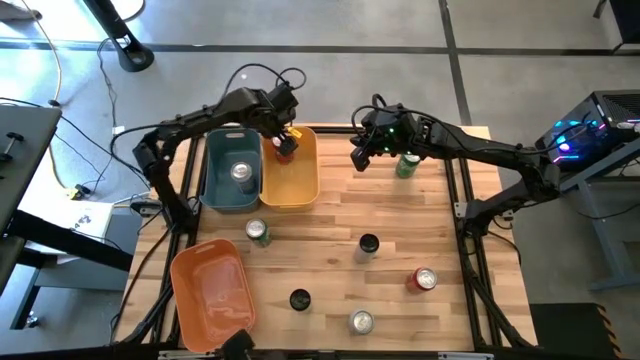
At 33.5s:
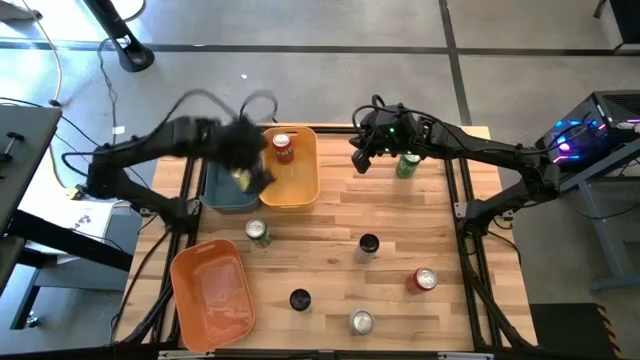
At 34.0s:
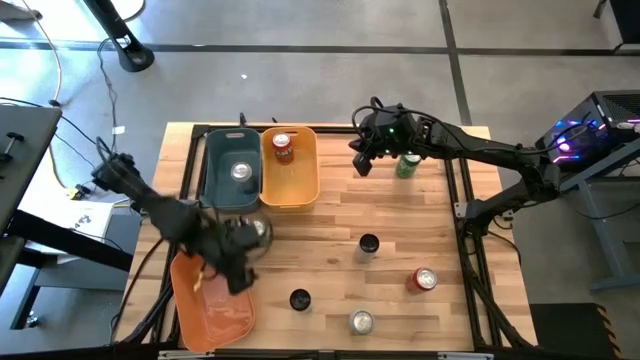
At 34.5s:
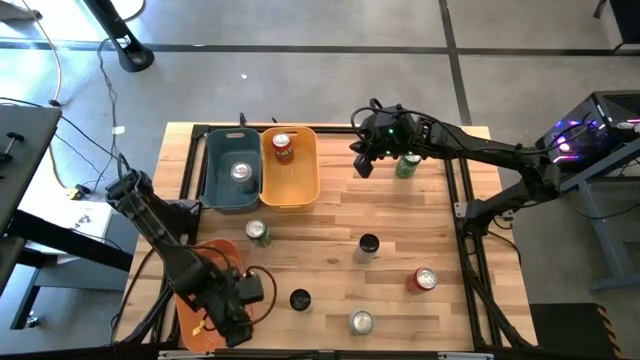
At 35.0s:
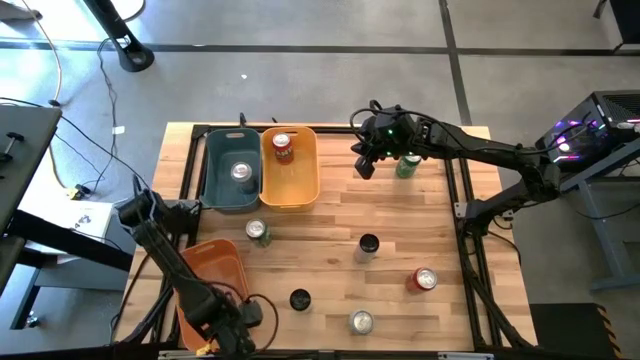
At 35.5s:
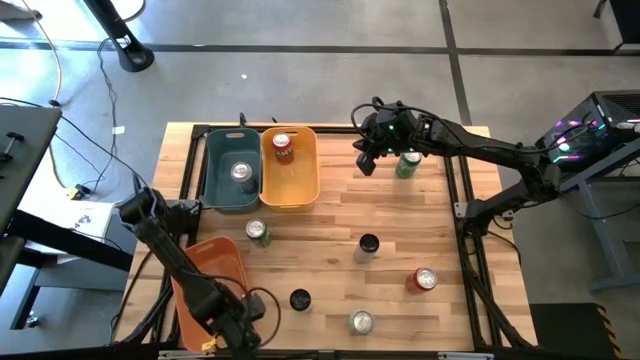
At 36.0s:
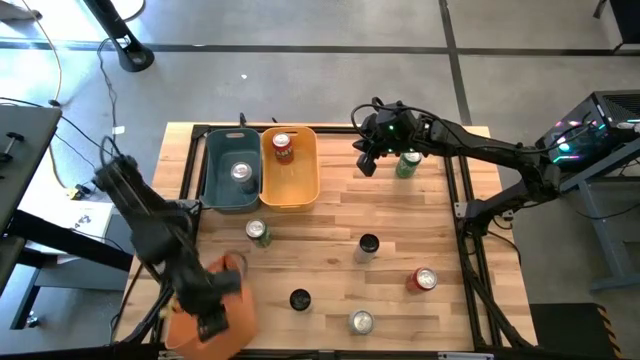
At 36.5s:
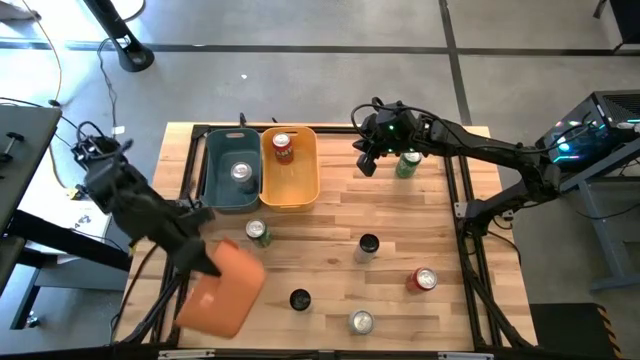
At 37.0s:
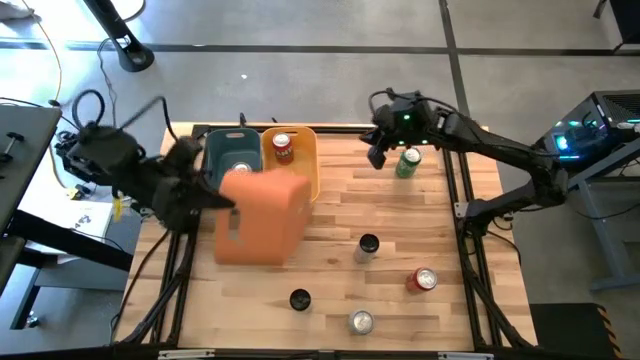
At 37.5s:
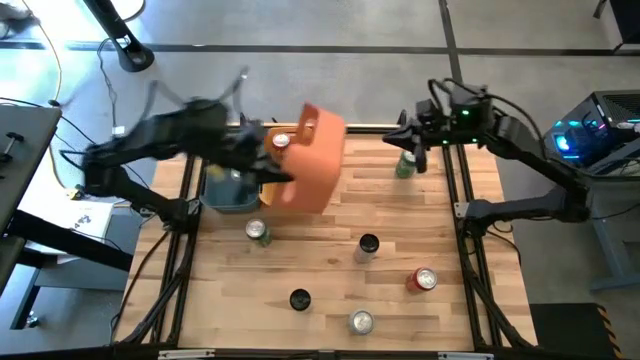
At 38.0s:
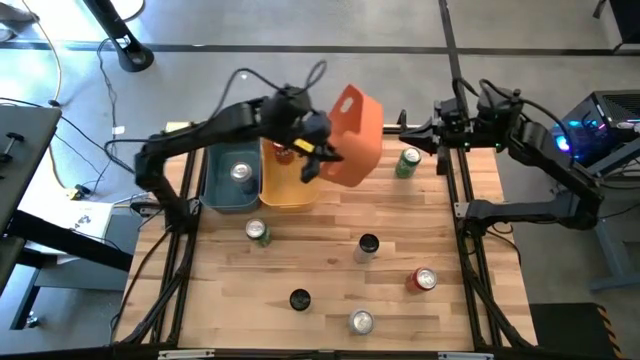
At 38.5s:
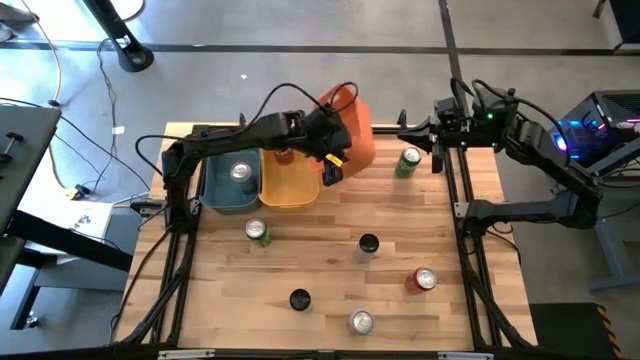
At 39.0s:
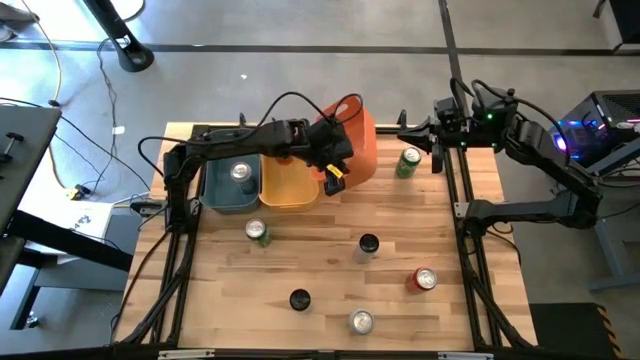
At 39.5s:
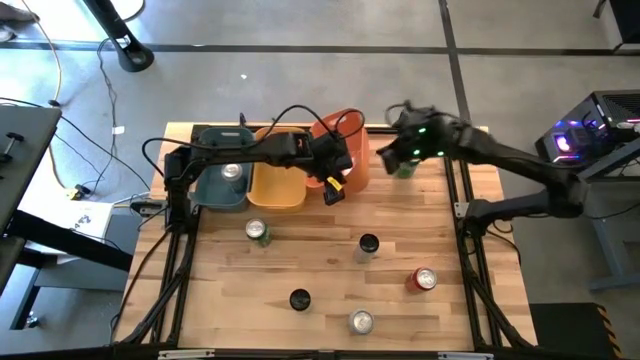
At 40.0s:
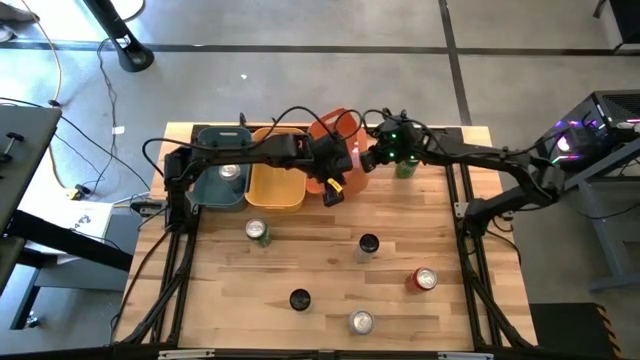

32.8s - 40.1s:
Task: Sort soda cans
Move the orange bin to the right of the yellow bin

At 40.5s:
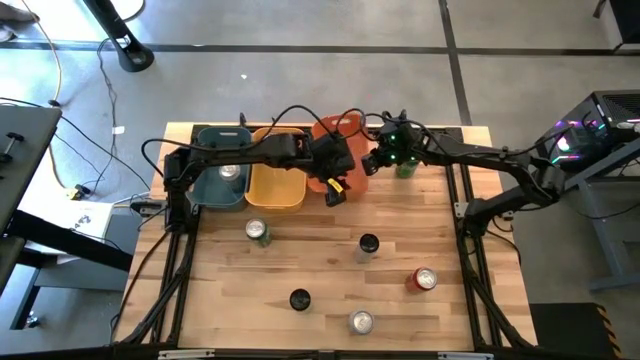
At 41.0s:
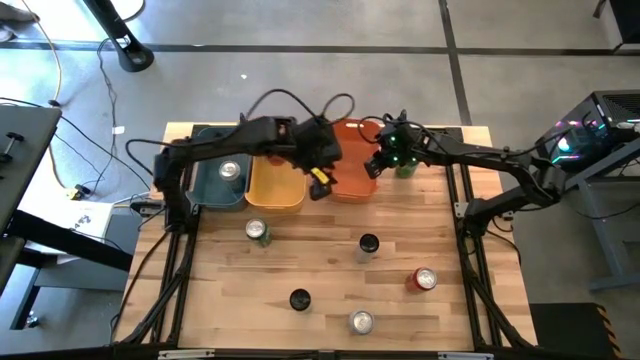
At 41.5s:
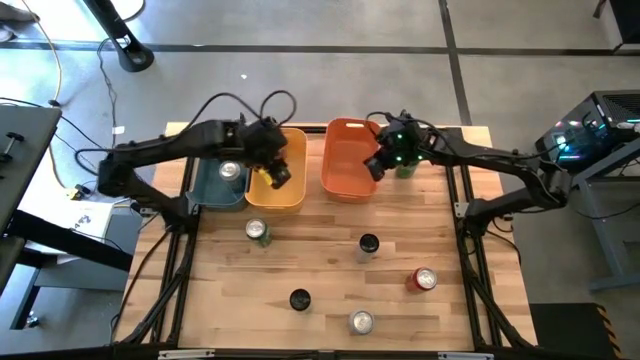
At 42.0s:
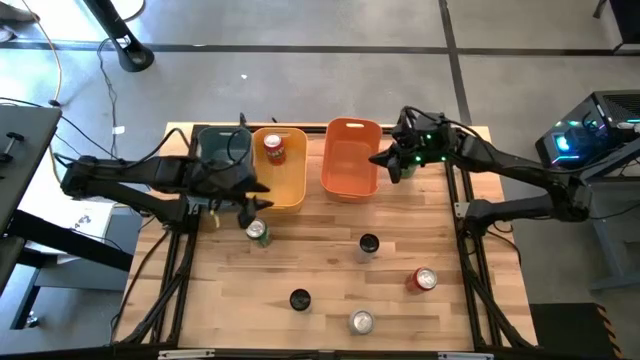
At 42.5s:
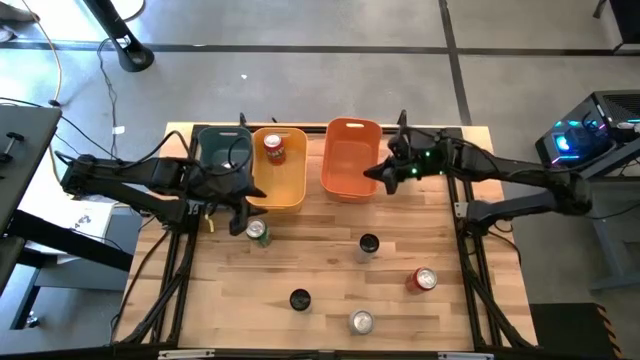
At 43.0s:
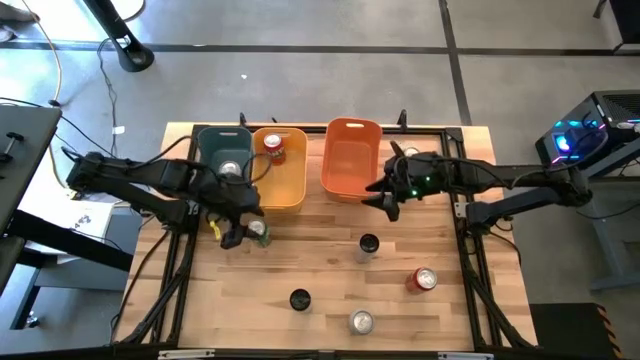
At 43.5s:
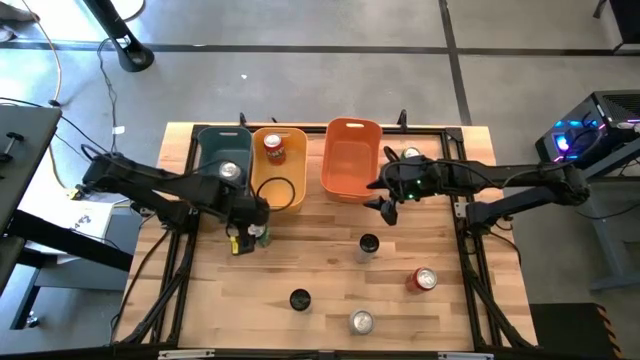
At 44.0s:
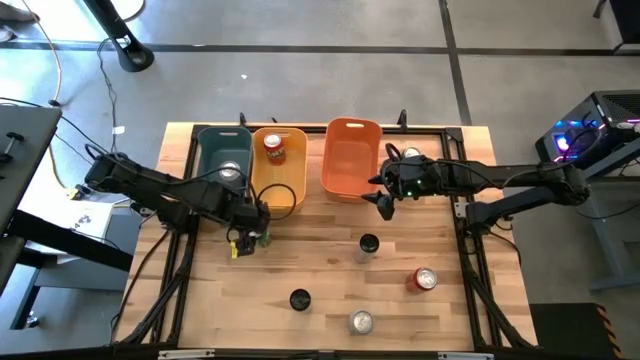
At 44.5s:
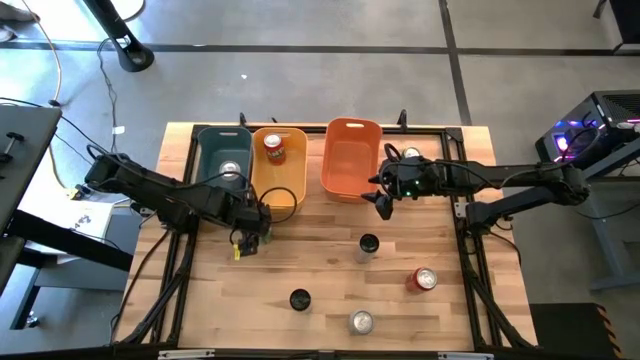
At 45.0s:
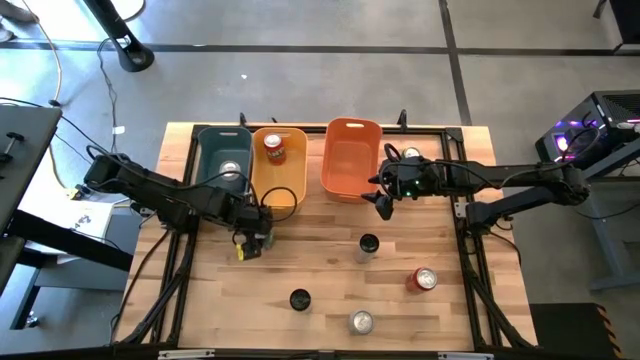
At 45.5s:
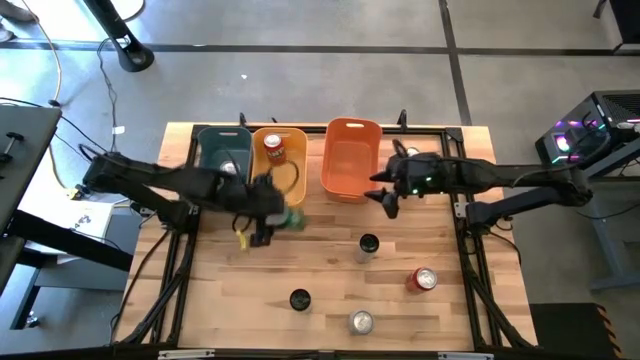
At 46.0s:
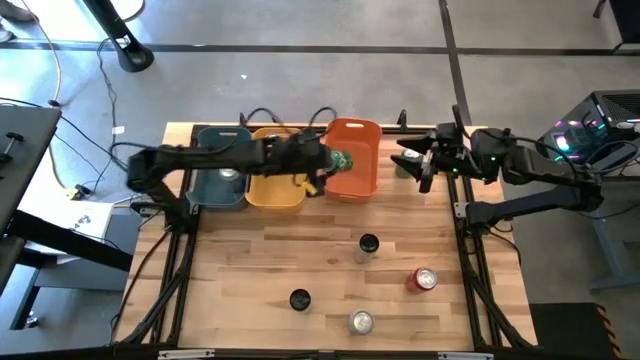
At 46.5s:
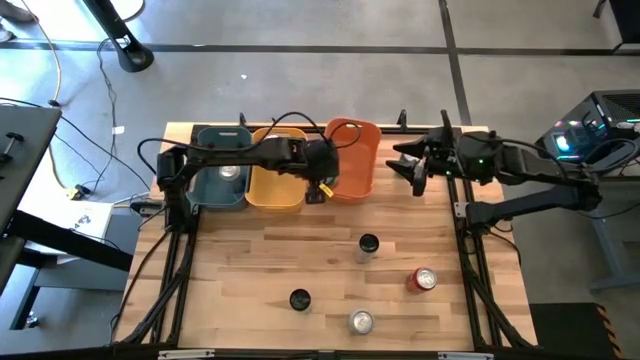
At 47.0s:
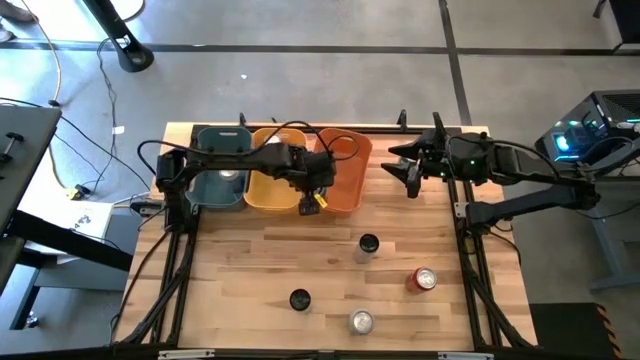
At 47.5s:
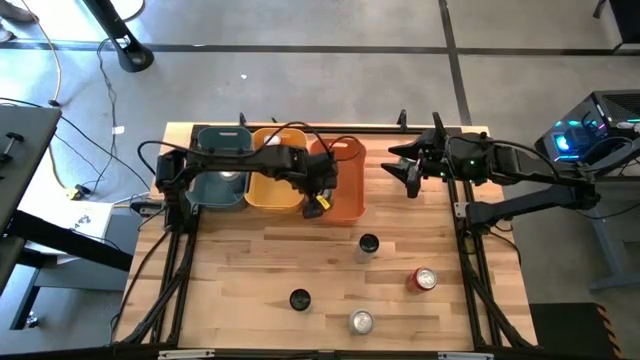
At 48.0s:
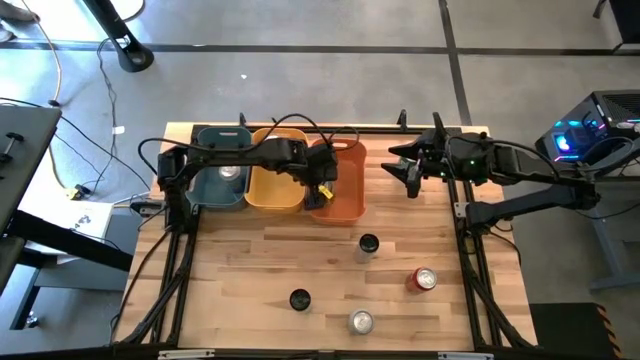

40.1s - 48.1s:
Put the bottom green soda can into the orange bin

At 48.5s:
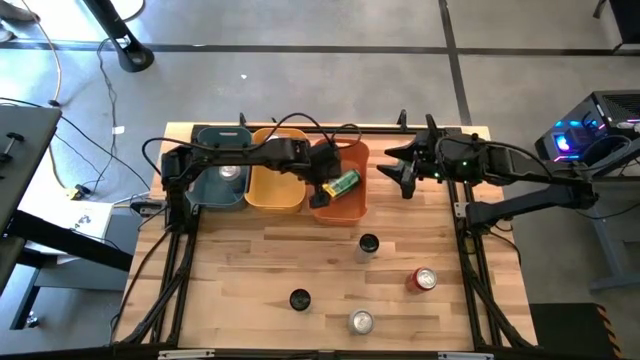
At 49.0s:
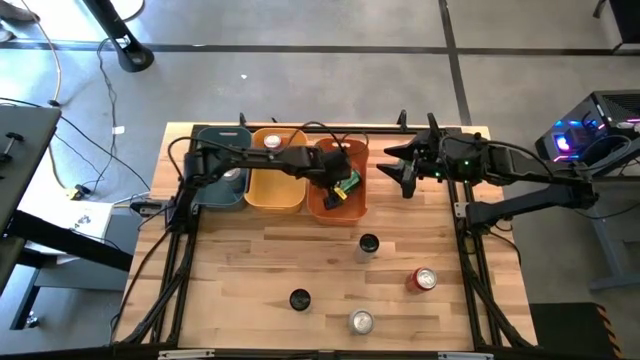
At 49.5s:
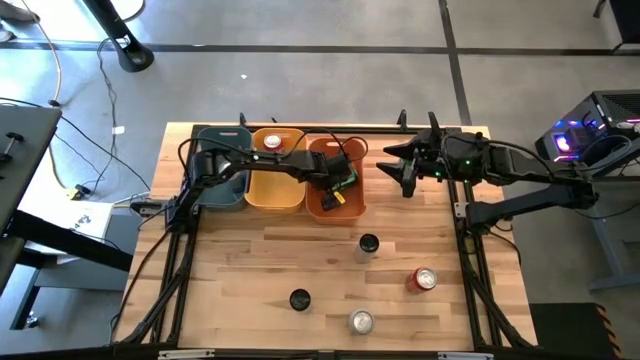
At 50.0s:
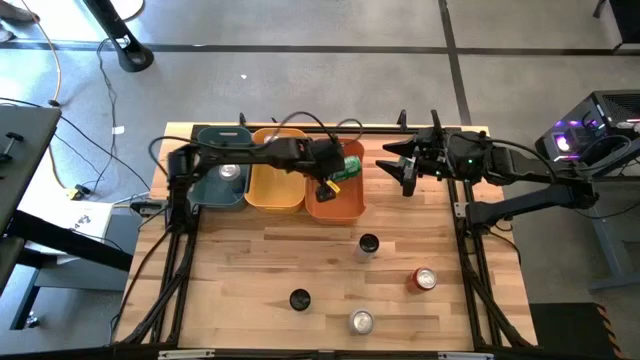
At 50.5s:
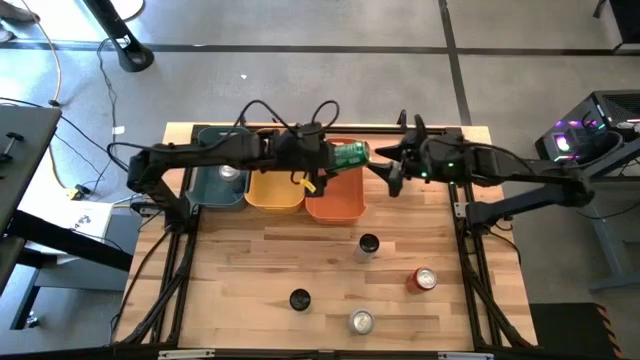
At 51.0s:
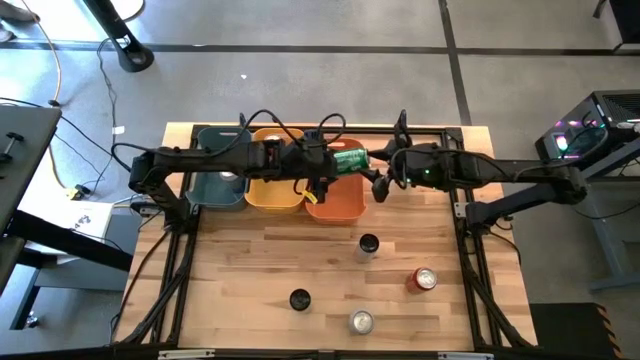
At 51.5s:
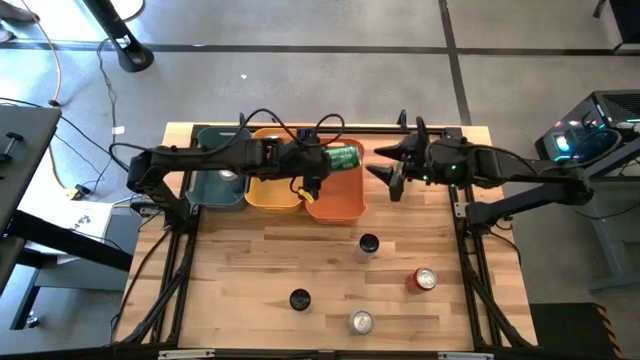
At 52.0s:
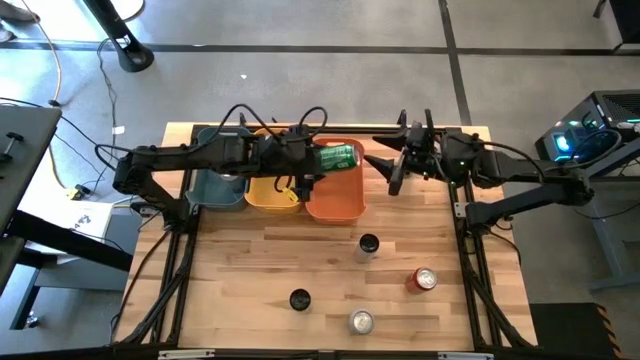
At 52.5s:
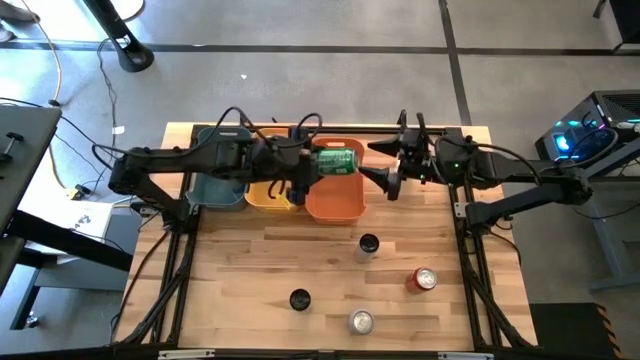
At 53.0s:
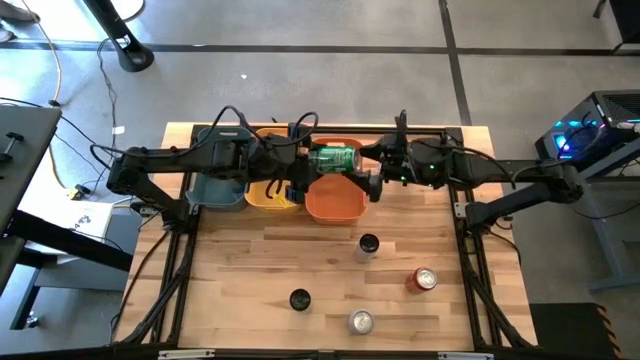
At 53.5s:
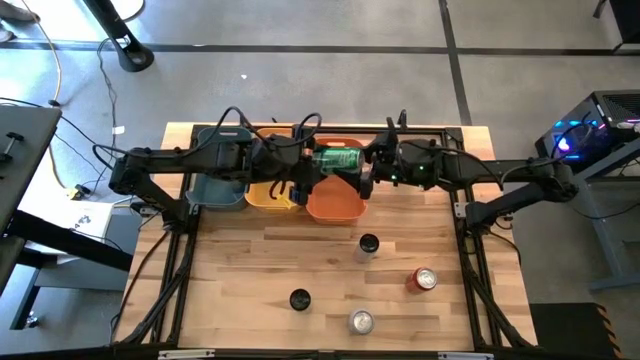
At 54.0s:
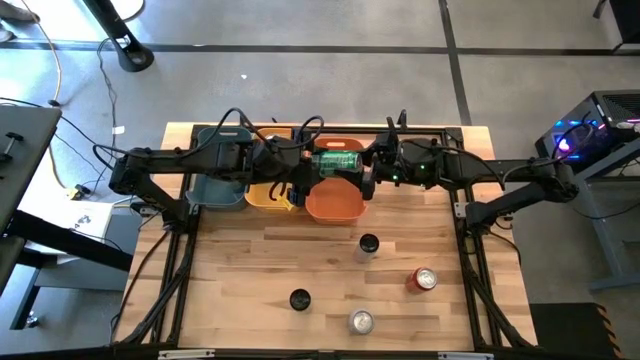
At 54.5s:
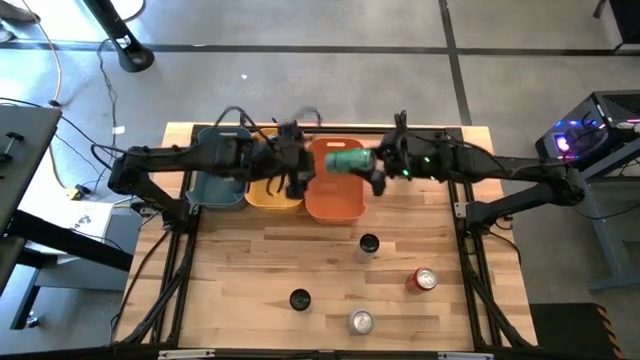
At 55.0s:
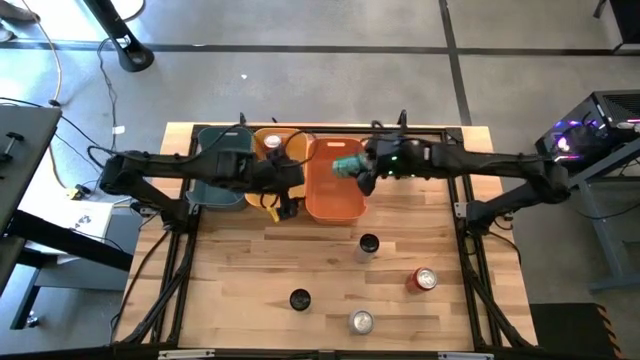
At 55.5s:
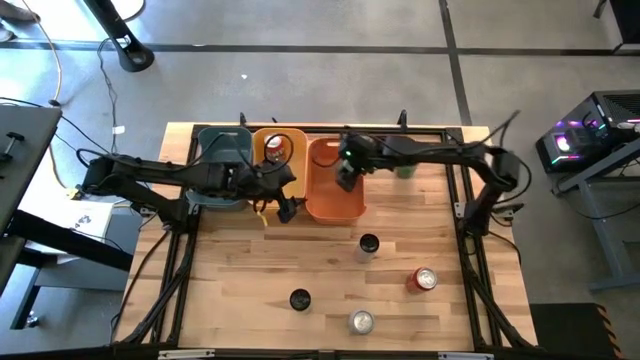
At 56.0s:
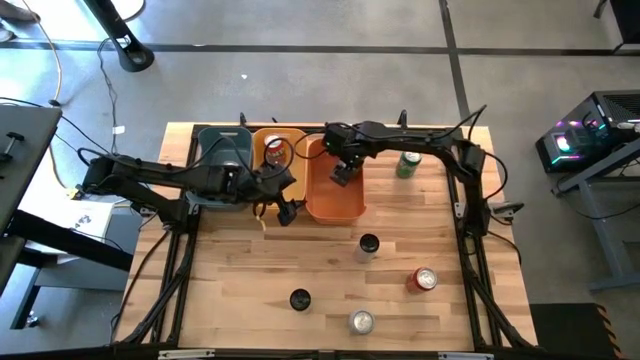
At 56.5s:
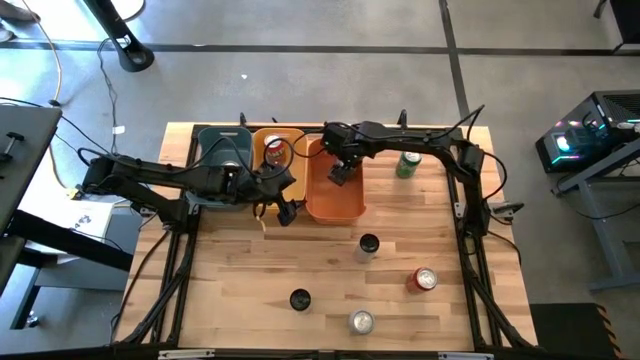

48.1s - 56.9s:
Put the bottom green soda can into the orange bin
